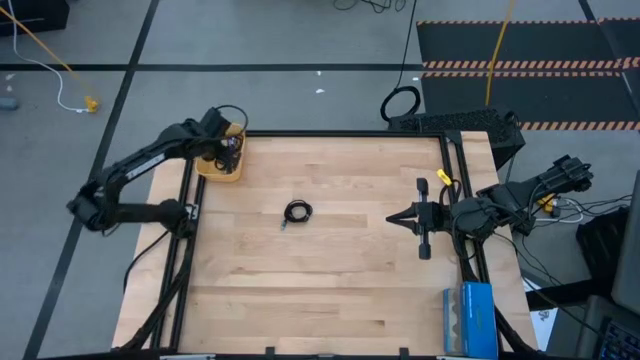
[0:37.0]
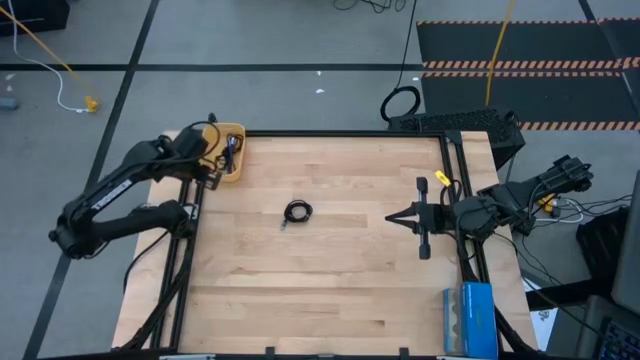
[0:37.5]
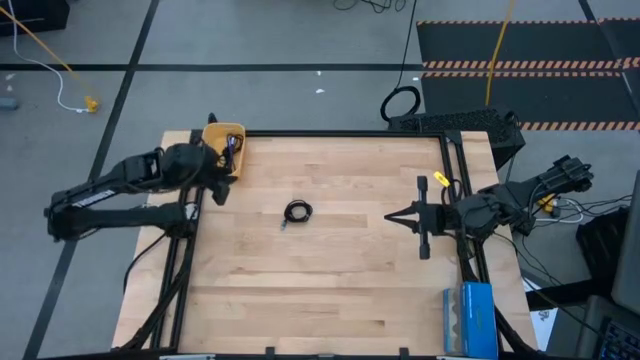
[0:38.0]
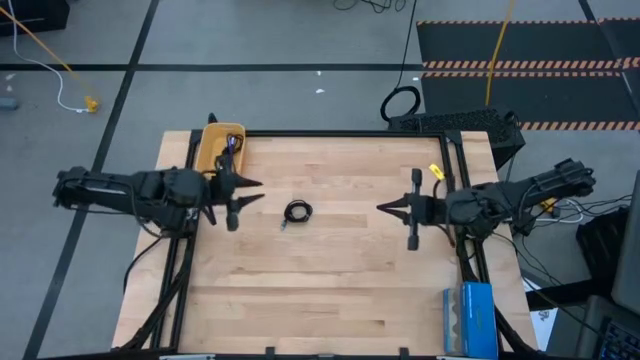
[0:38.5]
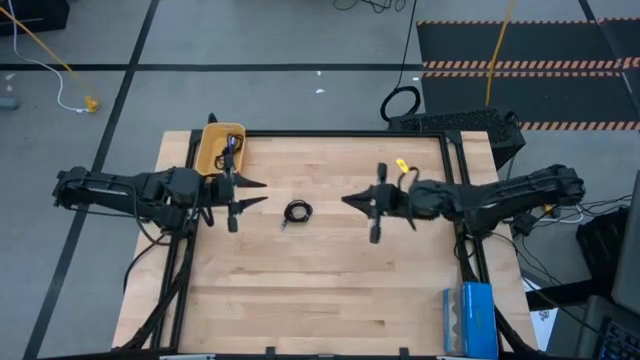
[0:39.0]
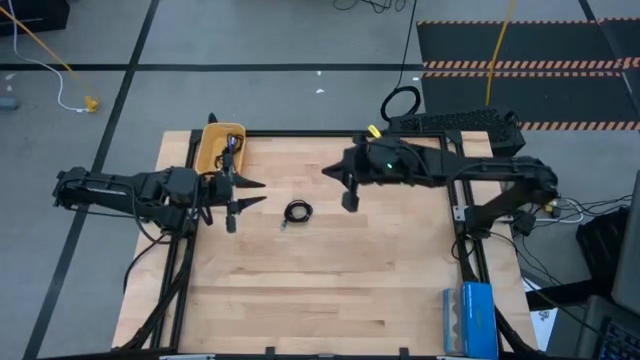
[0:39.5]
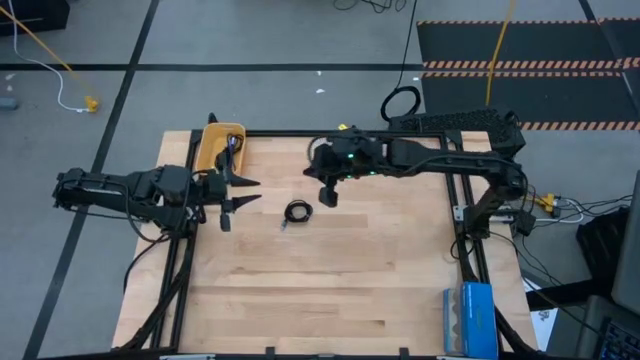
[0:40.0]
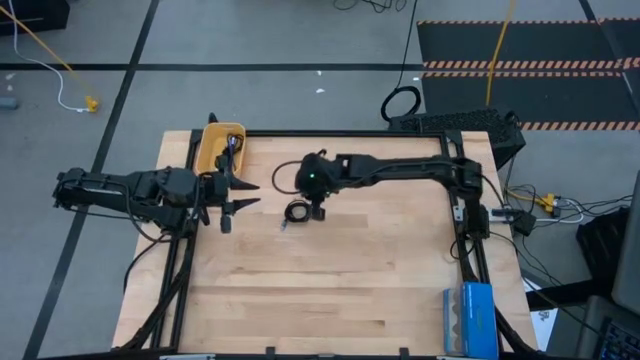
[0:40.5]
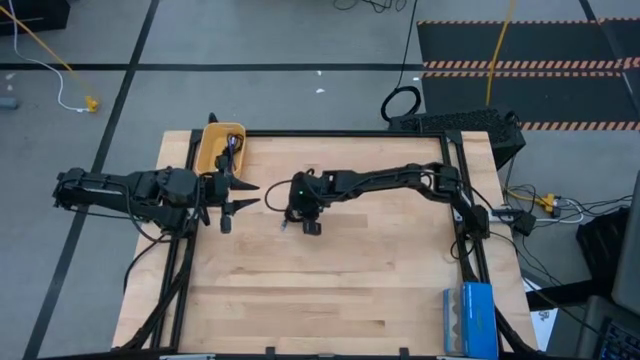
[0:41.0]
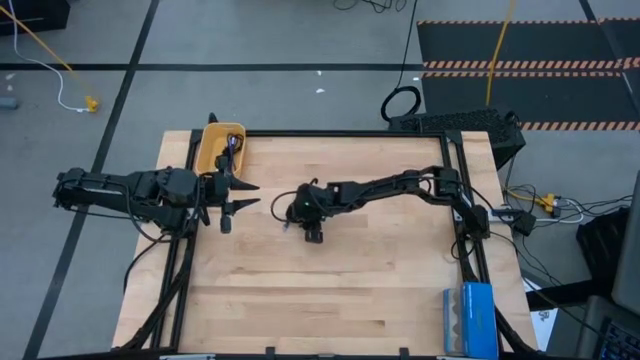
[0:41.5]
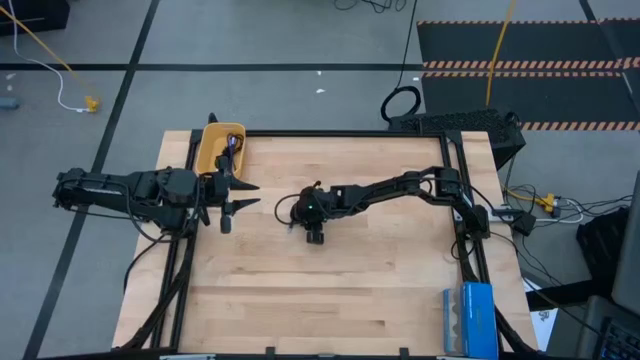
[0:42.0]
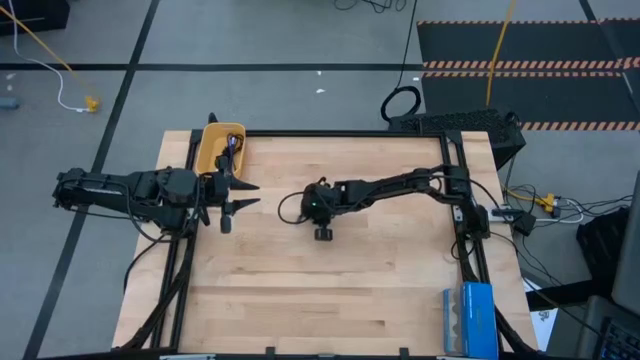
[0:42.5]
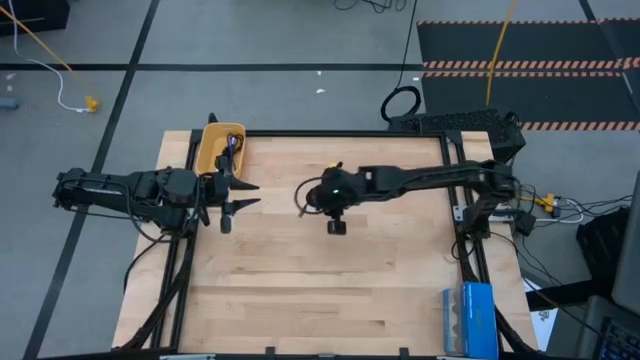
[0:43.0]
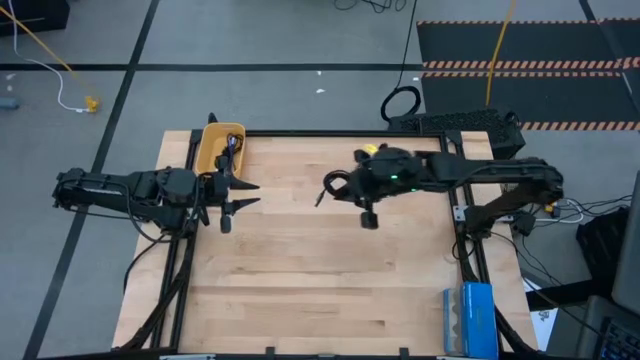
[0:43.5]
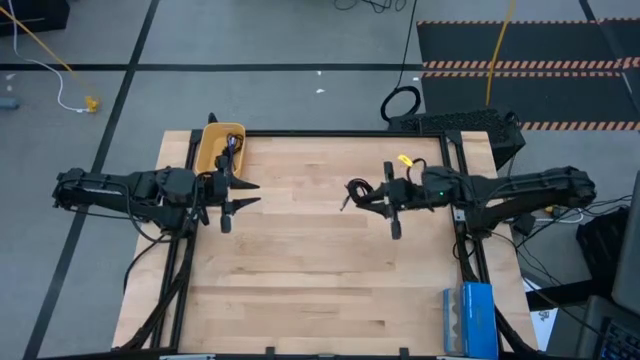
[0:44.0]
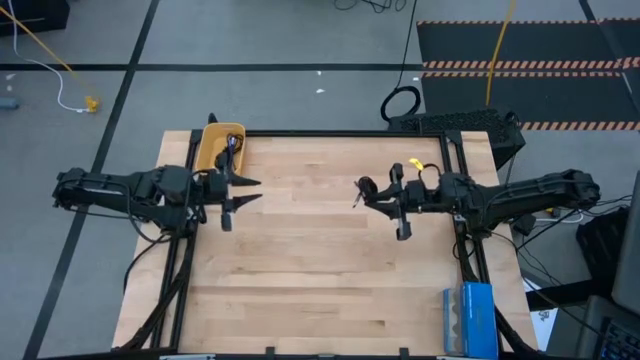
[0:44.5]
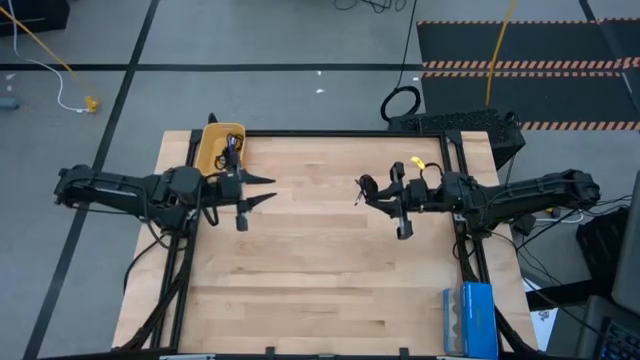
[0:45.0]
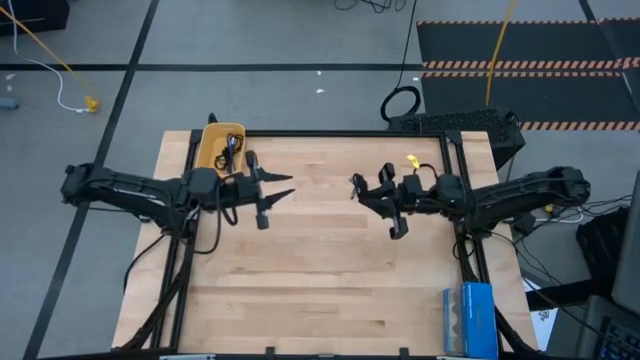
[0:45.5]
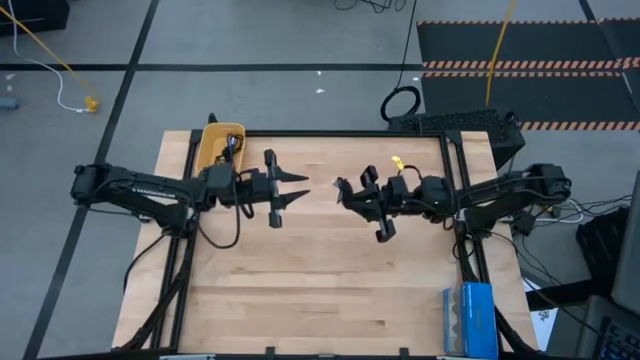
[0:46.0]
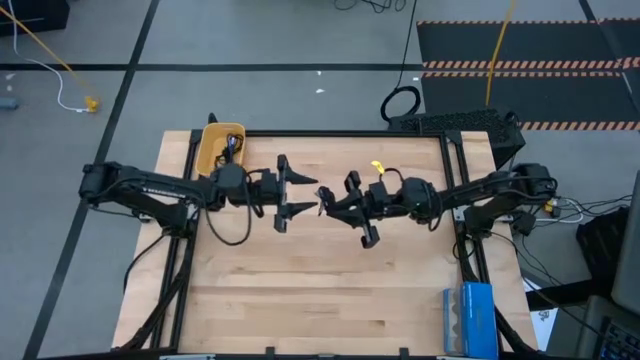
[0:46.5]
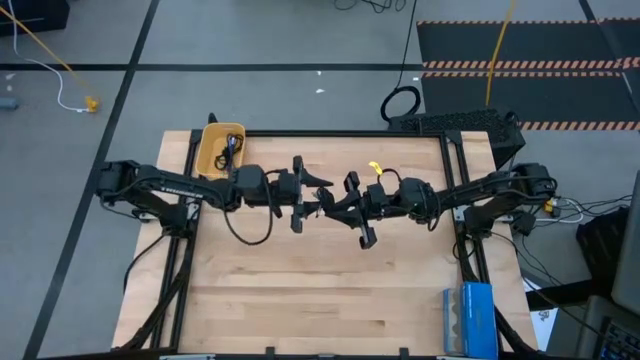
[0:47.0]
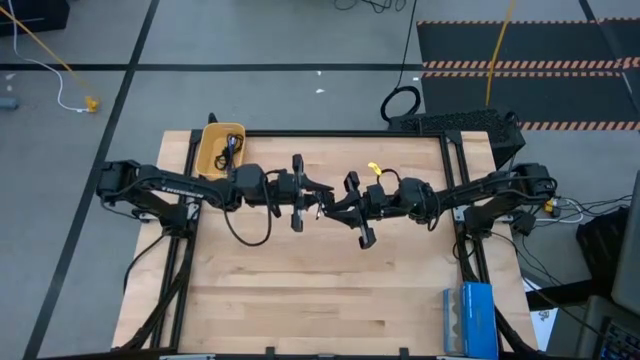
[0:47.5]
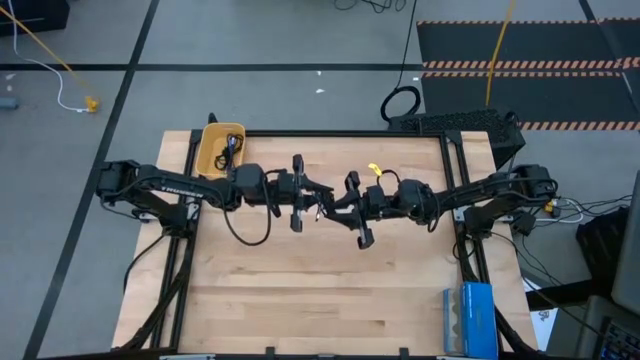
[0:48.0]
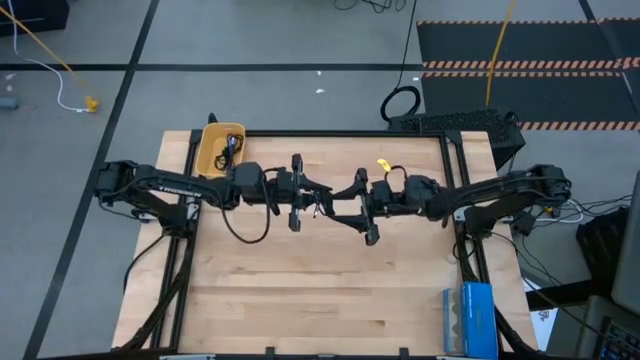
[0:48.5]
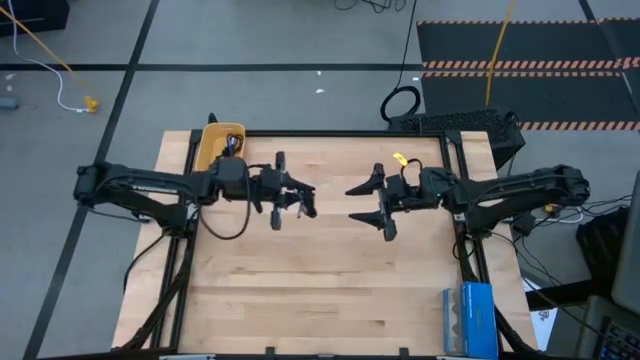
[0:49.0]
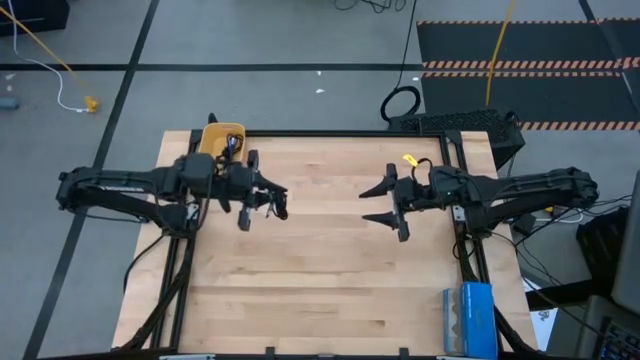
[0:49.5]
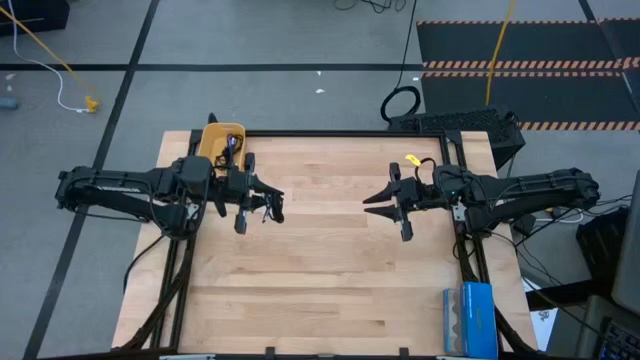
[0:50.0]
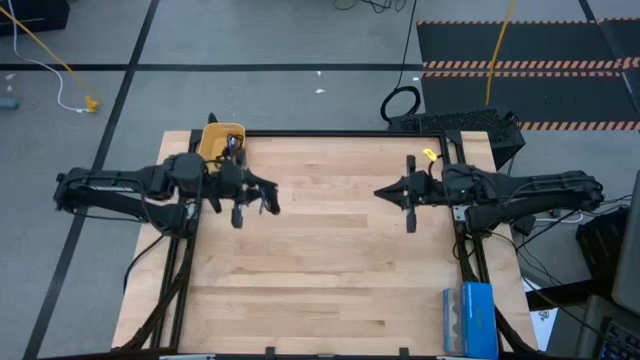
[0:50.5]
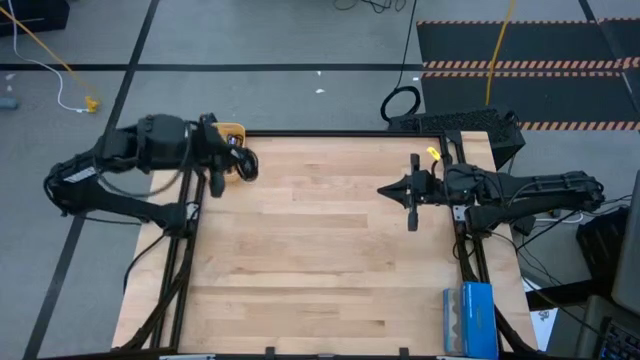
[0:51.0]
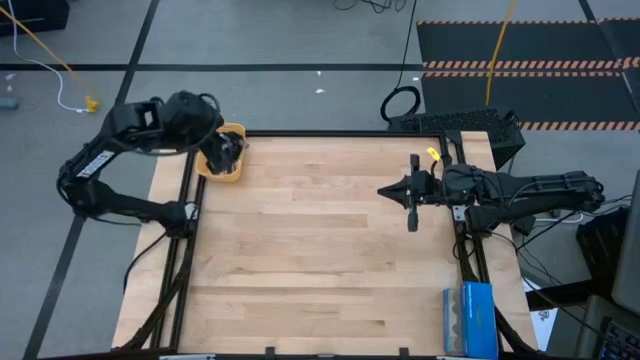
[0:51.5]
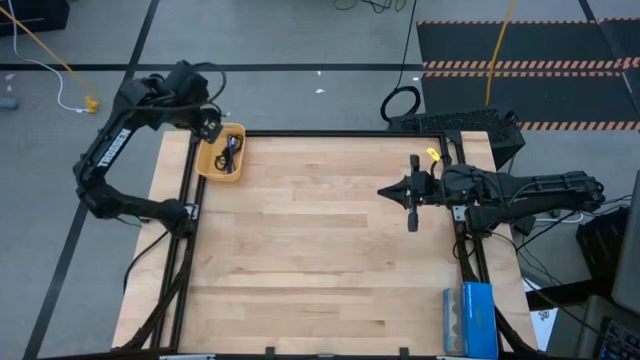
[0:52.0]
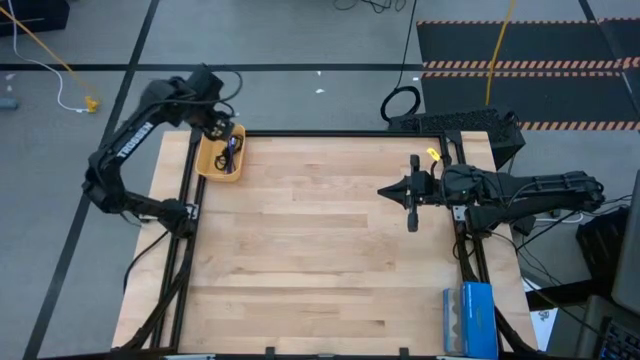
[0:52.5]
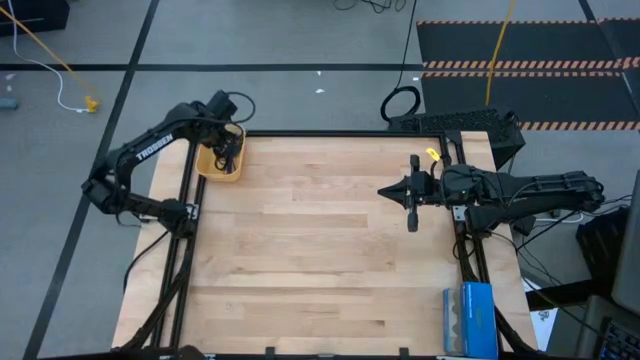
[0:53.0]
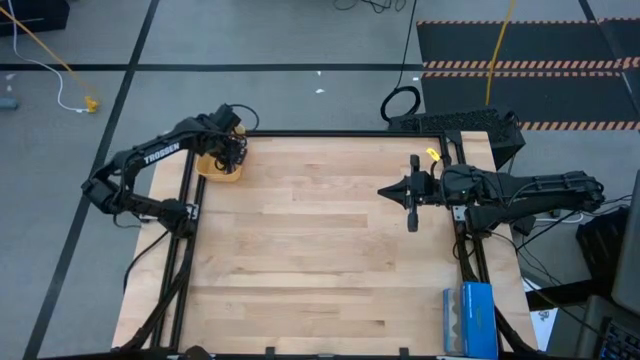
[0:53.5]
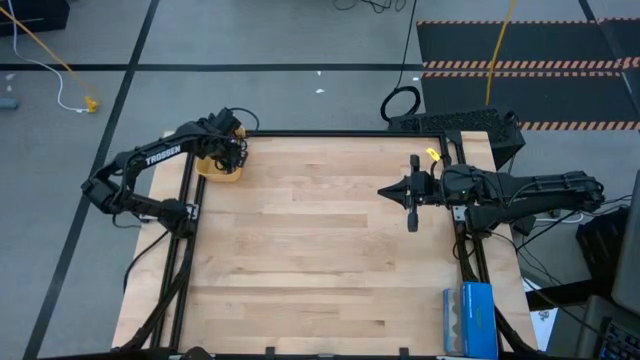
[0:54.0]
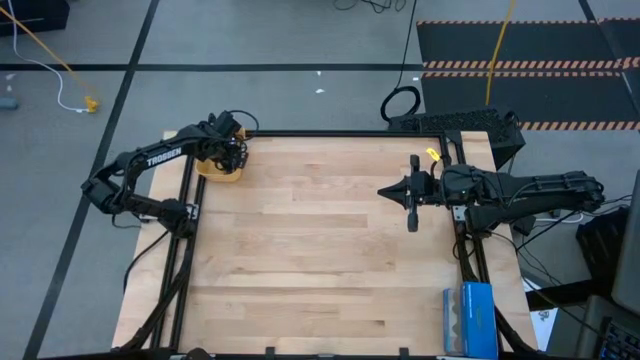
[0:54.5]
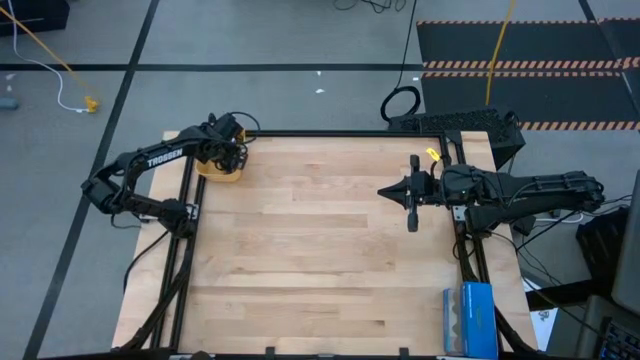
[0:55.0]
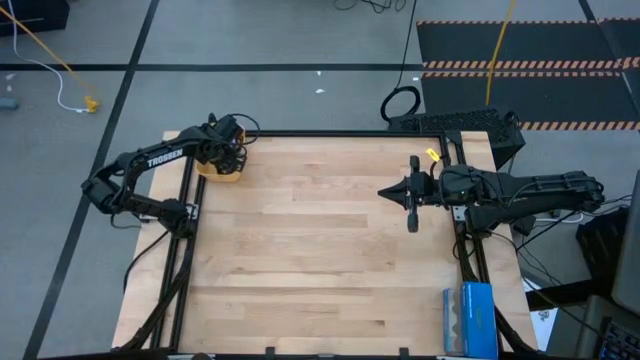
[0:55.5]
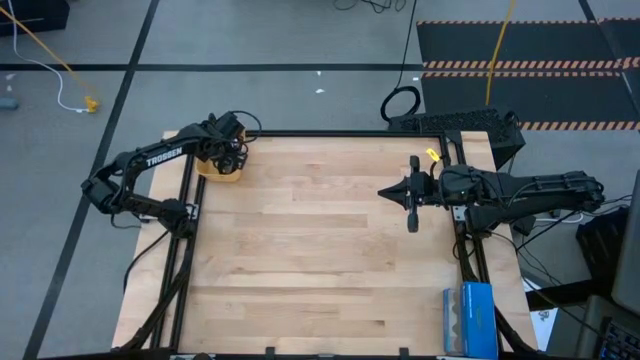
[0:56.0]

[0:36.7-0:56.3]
Task: Pick and place USB-C Cables
Put the black charger cable into the yellow bin
